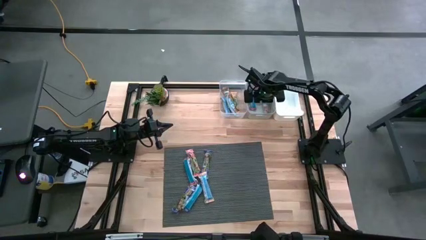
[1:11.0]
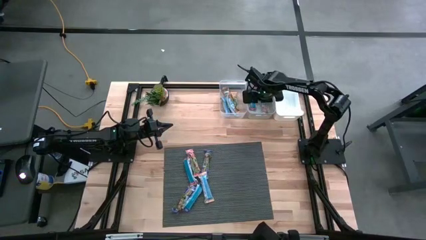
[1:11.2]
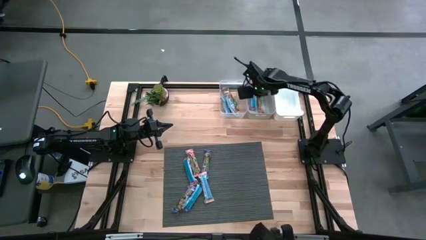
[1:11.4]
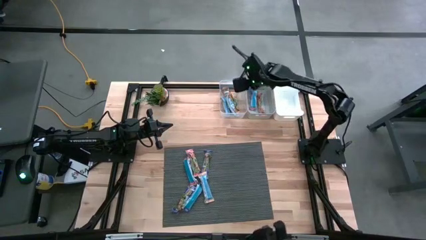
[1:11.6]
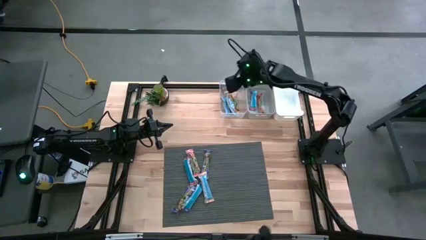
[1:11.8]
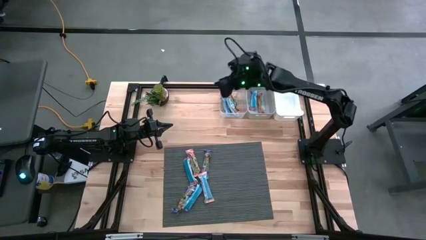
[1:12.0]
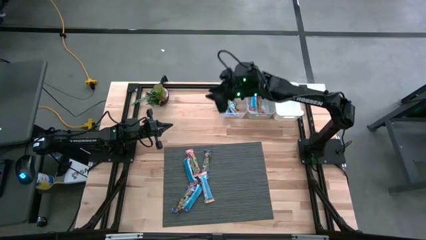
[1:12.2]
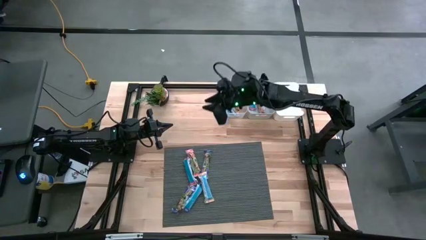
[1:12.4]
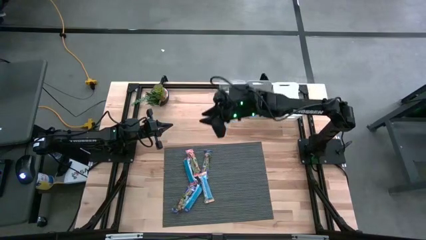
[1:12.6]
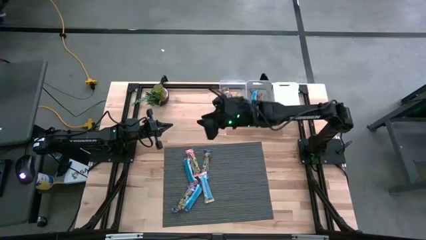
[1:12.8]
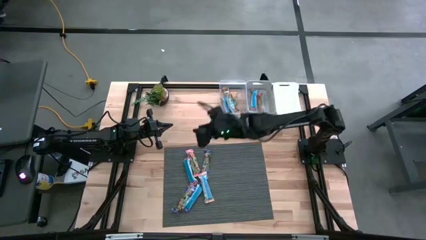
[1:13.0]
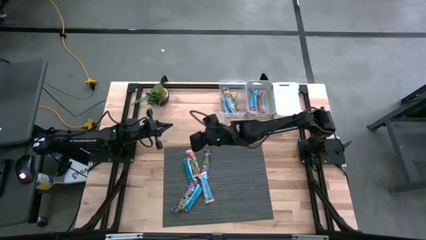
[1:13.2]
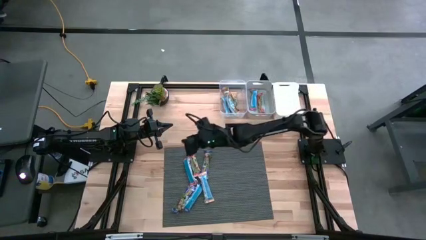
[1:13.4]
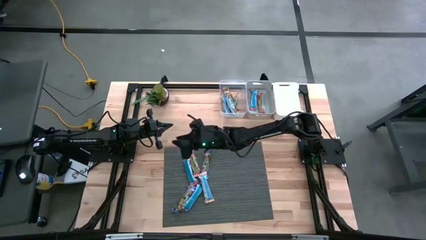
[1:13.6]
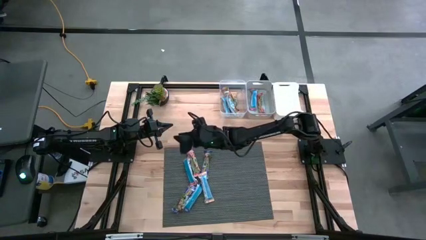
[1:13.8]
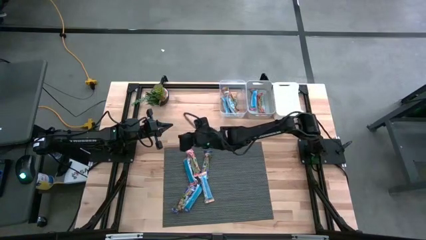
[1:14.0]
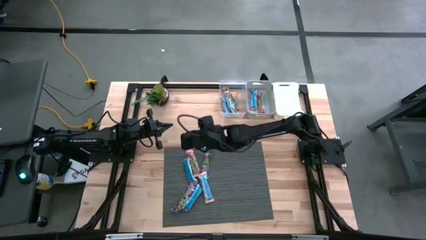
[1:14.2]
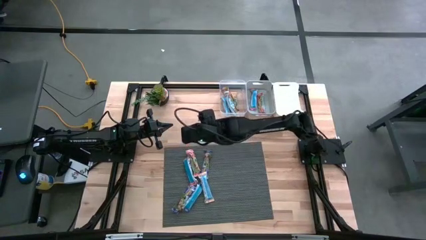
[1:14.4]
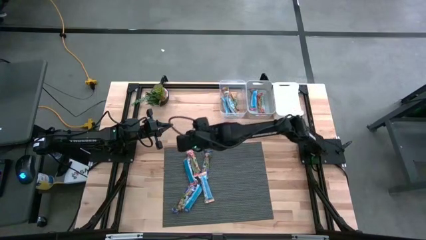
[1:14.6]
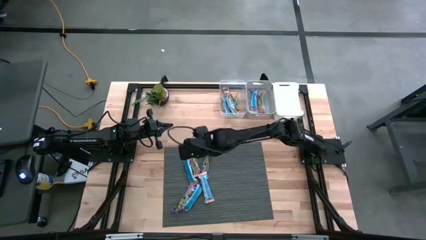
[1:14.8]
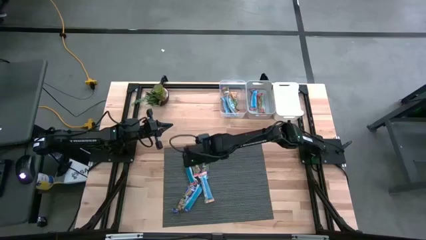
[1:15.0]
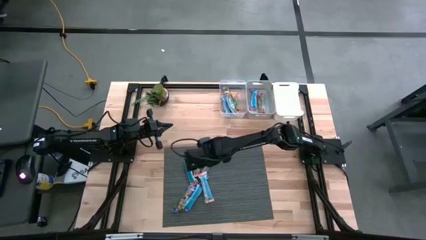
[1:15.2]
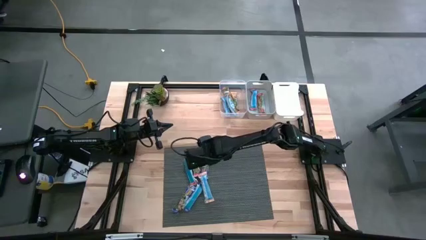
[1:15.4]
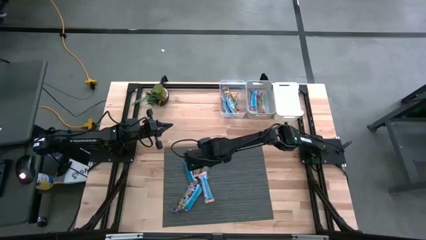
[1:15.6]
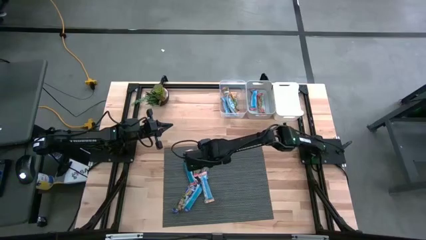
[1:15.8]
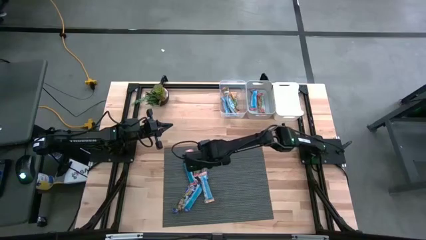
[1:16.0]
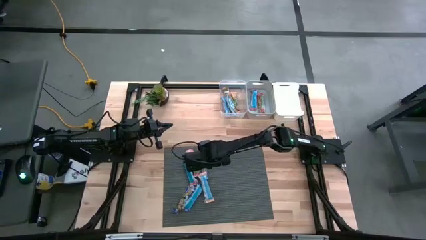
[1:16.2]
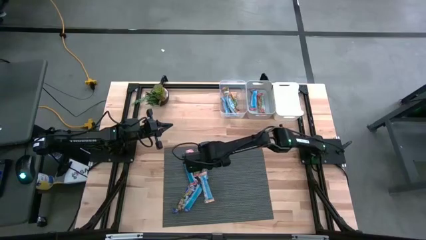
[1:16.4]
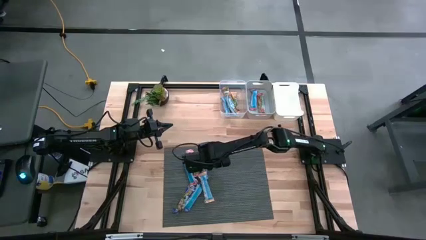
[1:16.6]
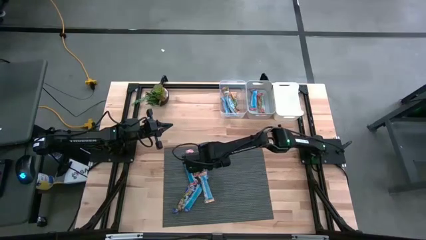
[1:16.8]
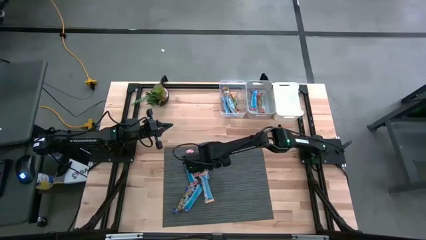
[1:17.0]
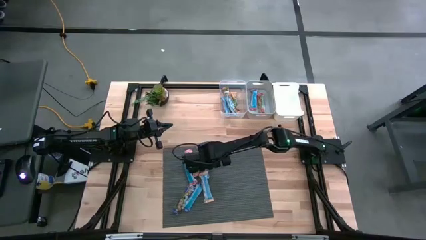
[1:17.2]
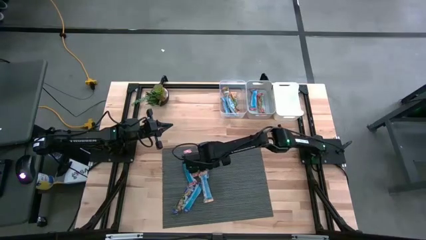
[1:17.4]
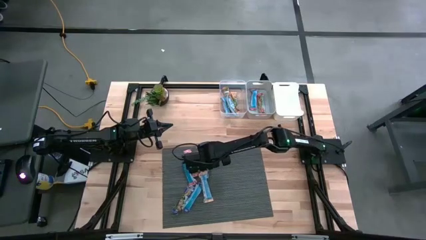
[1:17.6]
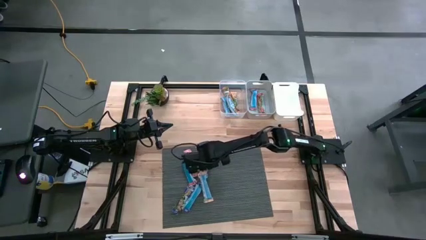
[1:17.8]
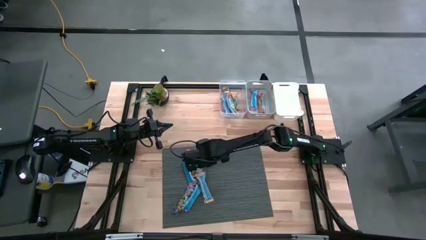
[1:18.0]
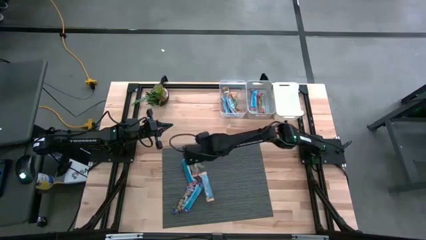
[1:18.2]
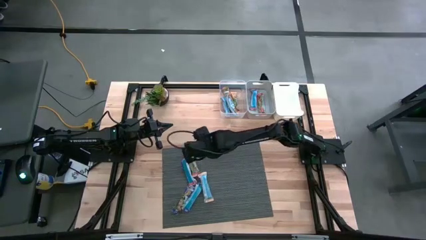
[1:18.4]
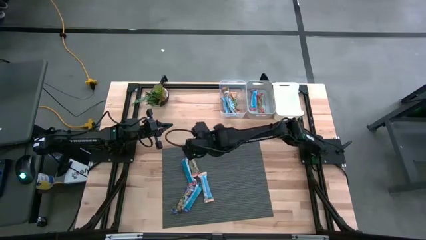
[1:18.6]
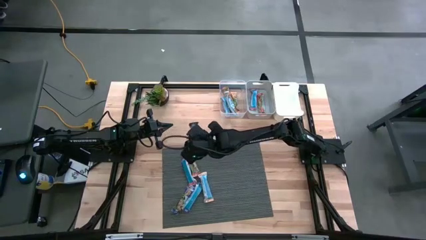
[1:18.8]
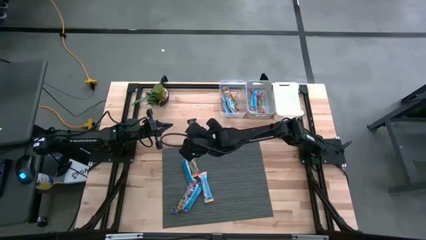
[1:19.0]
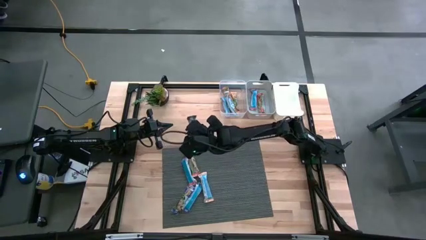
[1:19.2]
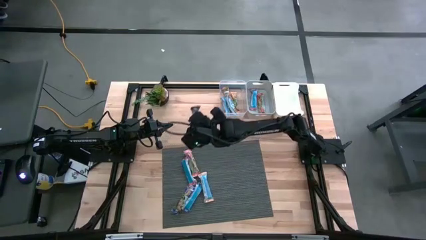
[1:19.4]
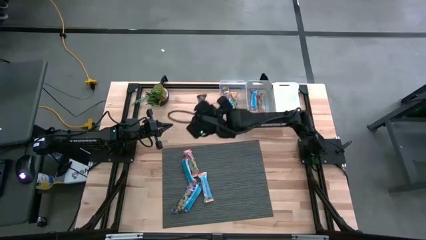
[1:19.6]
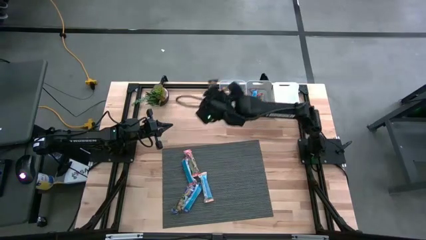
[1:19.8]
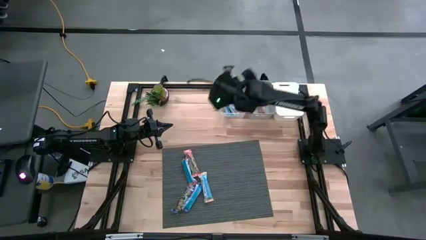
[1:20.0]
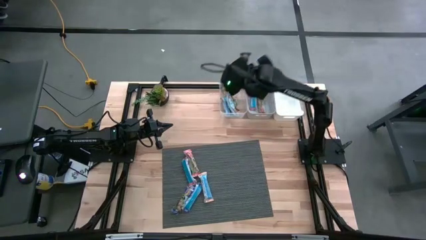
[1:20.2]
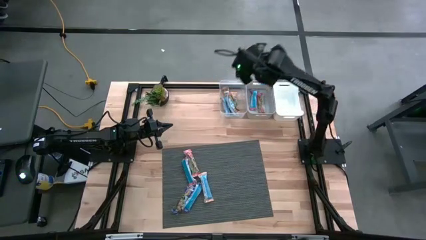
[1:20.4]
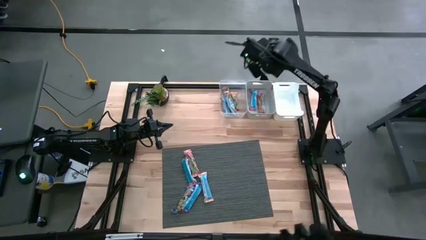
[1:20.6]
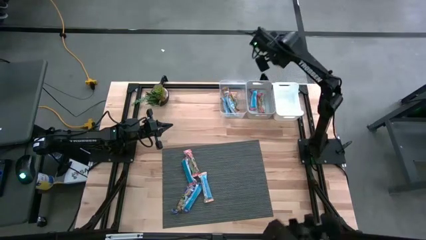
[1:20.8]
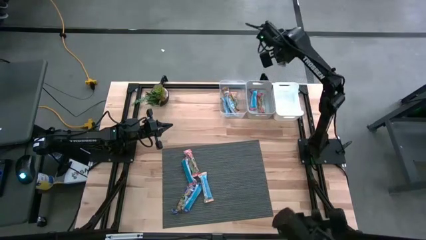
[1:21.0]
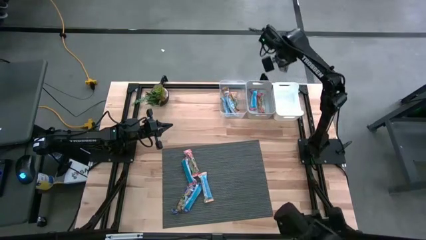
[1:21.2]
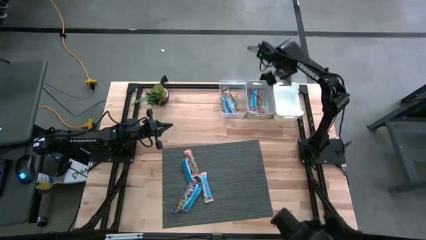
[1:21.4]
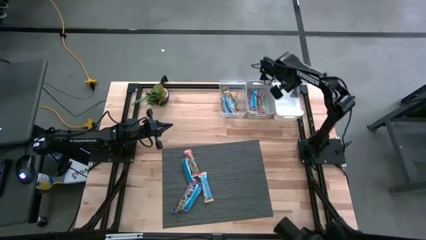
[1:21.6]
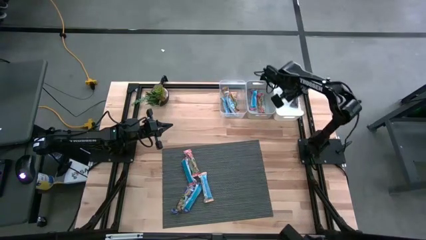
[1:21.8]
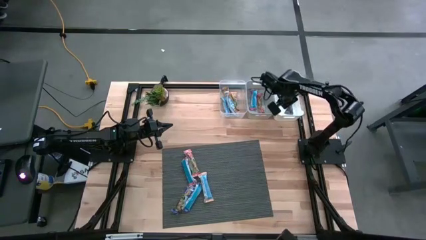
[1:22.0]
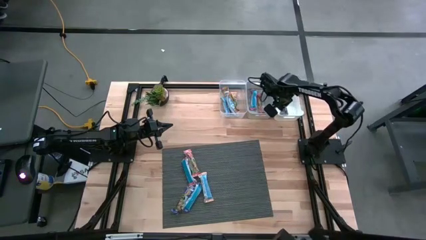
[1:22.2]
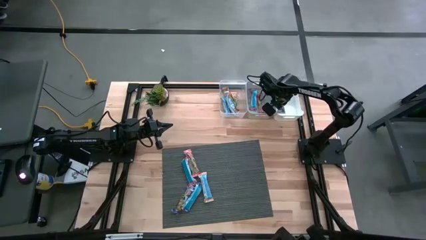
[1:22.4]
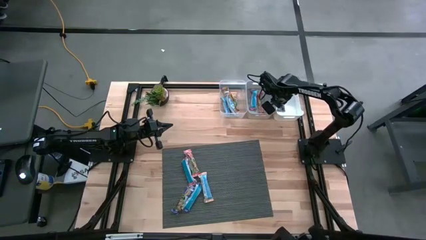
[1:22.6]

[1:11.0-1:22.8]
Task: Pick and place Granola Bars by type
Put the blue granola bar into the white bin

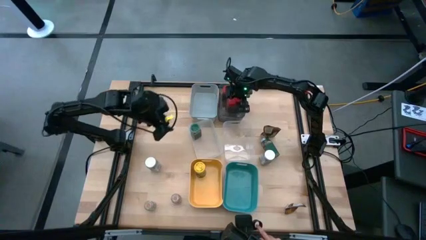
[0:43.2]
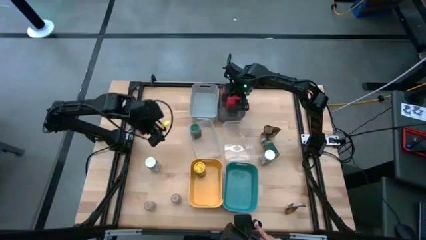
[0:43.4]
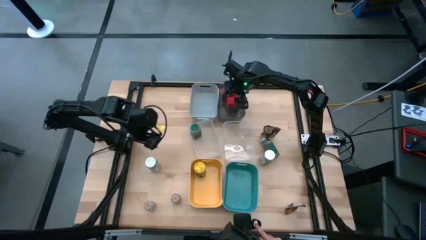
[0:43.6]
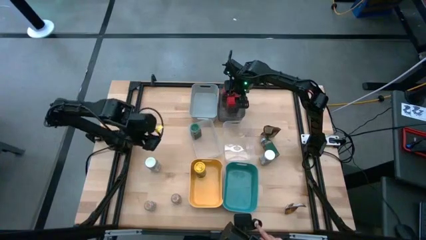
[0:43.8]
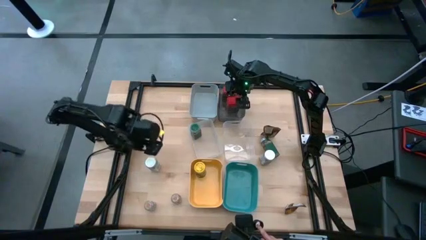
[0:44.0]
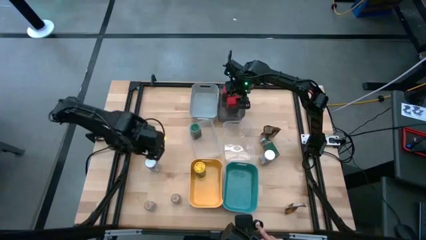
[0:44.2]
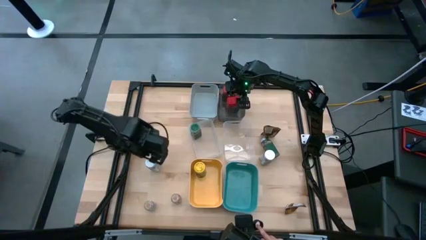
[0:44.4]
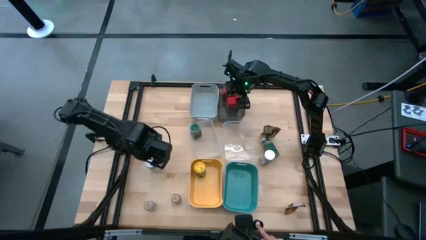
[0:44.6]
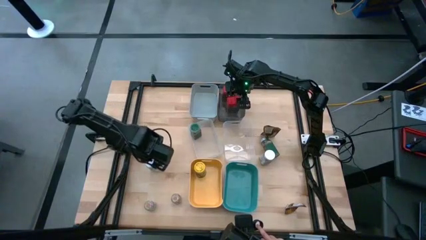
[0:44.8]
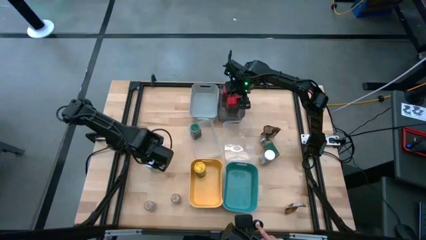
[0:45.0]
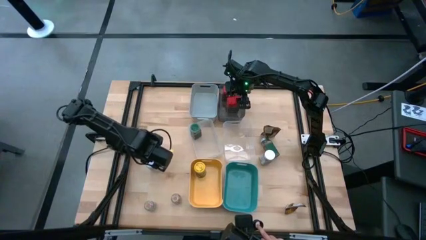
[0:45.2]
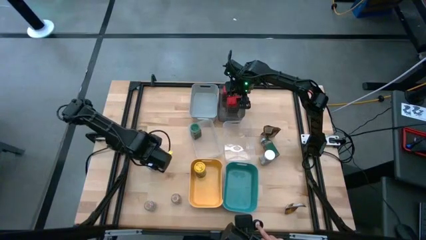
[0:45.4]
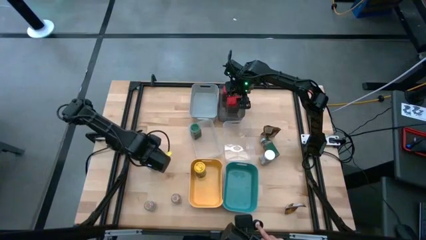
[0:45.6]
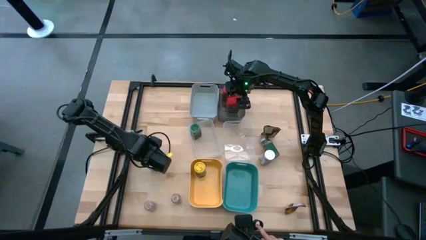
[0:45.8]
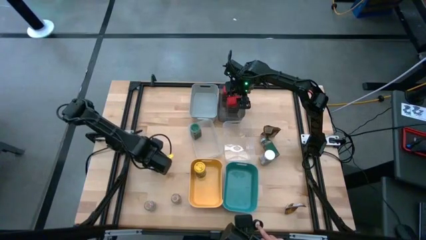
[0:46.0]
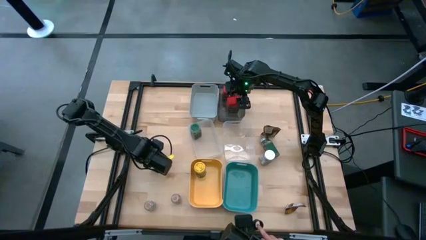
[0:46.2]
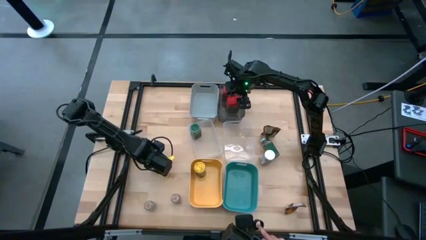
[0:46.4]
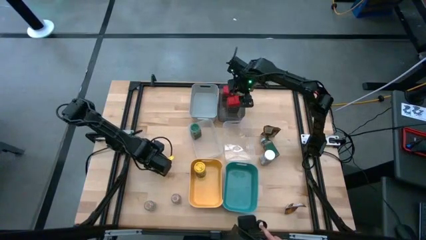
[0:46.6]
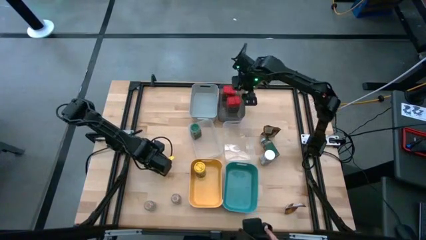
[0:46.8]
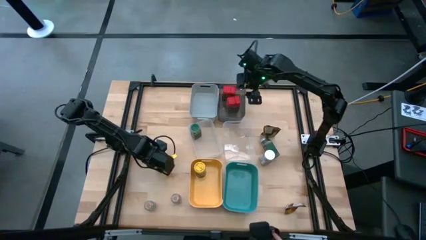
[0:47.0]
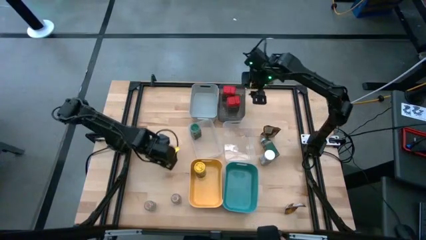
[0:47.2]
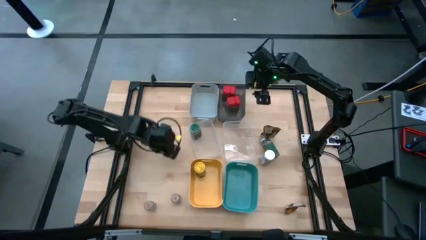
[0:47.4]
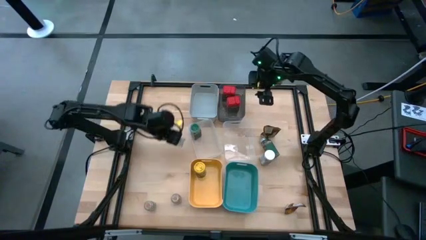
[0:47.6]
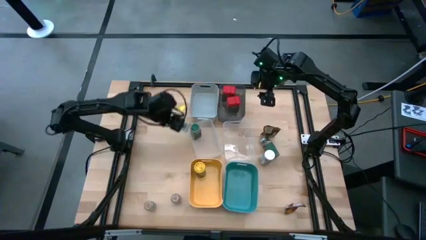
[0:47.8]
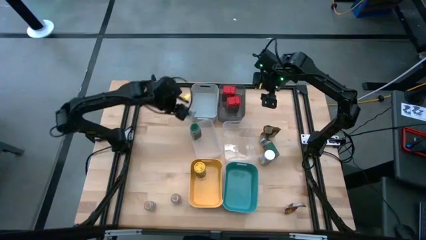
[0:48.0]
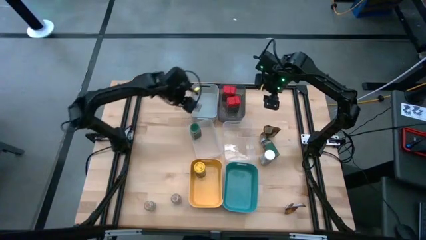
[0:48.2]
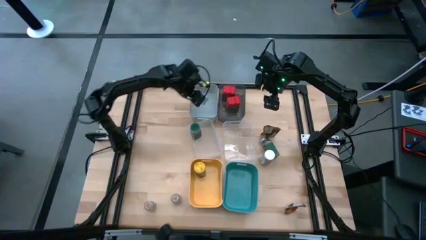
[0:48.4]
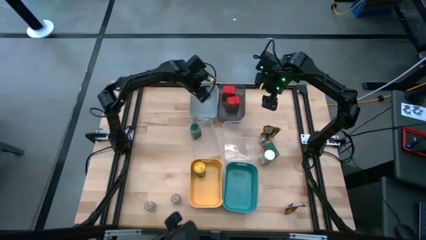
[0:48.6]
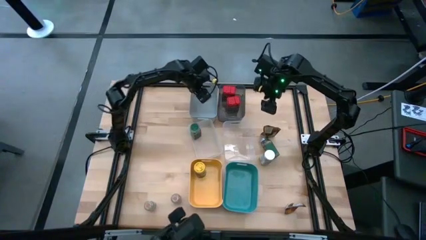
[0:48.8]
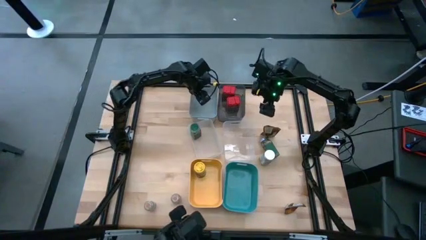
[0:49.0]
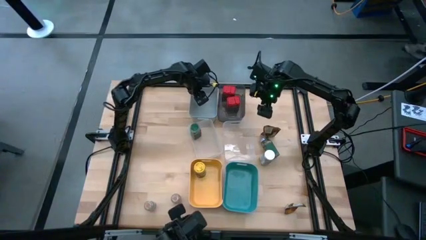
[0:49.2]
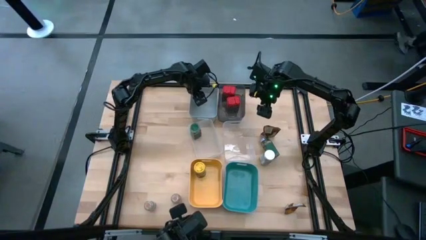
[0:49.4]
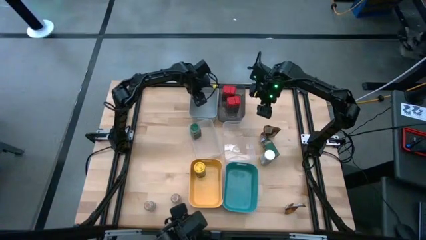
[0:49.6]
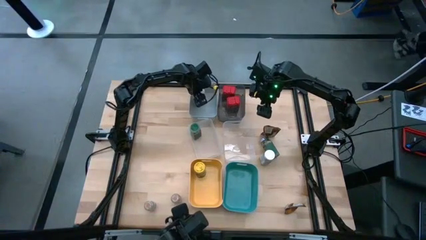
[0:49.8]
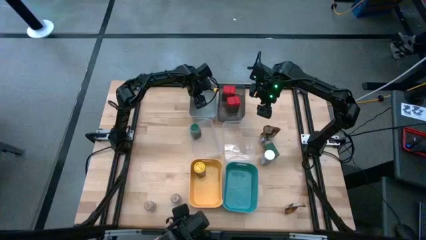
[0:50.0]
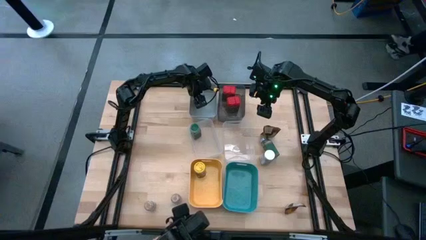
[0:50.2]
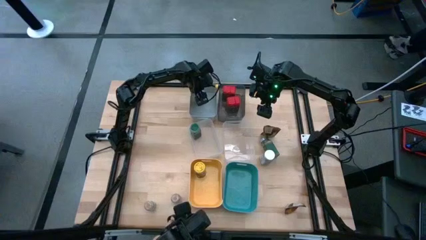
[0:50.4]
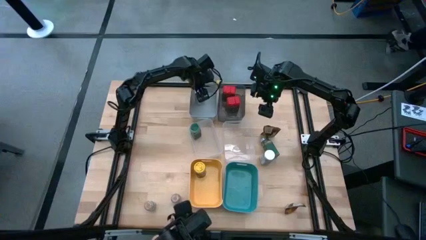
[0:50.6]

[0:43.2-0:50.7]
Task: Sort spices by type
Put the left white seasoning bottle into the gray bin
